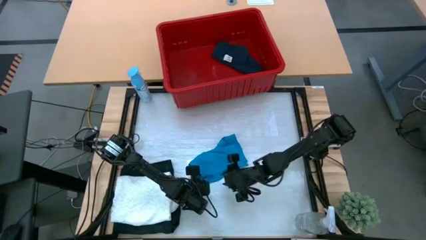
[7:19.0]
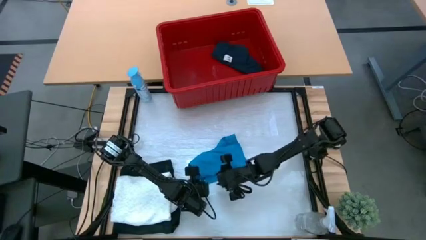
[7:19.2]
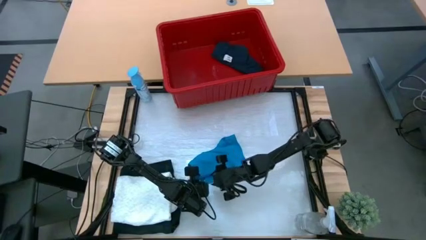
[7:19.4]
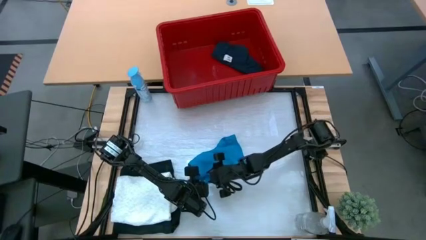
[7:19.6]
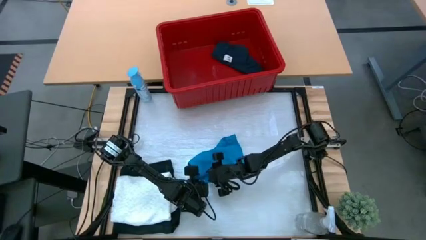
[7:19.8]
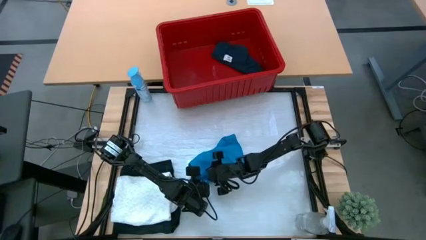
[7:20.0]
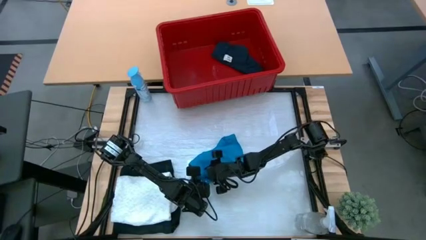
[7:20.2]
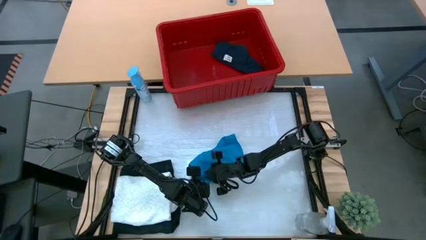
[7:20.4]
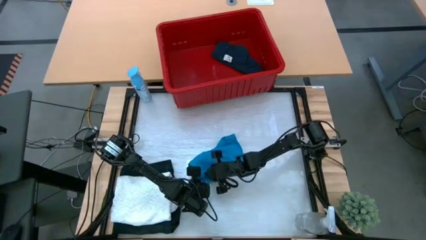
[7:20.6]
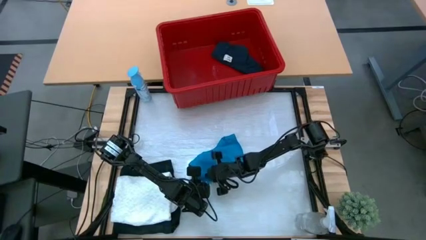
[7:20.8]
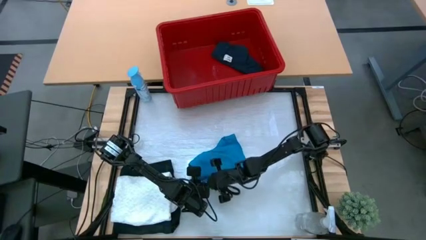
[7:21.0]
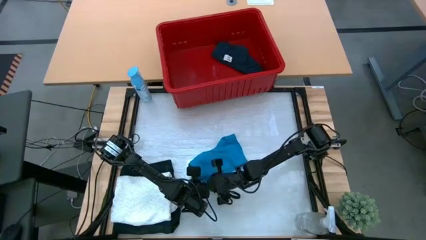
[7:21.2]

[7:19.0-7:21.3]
Task: Fold Laundry from Bin
Fold the blue shorts from the red bin

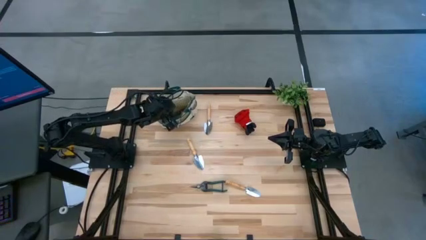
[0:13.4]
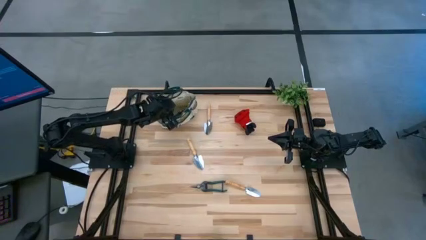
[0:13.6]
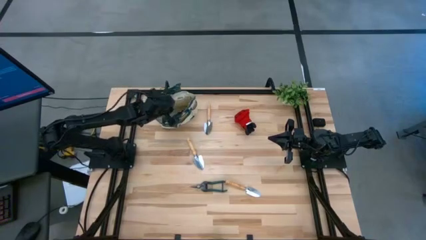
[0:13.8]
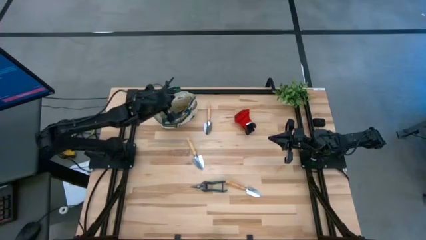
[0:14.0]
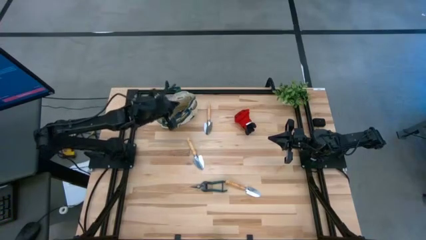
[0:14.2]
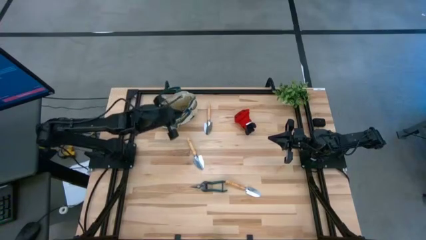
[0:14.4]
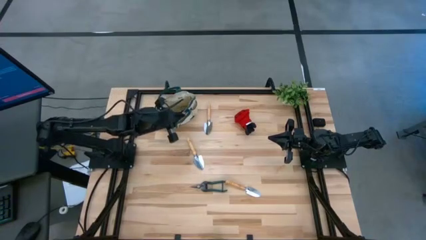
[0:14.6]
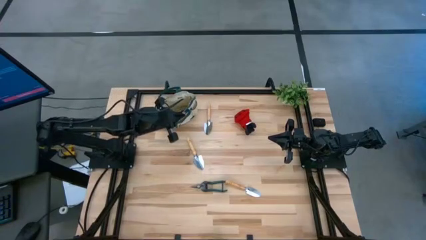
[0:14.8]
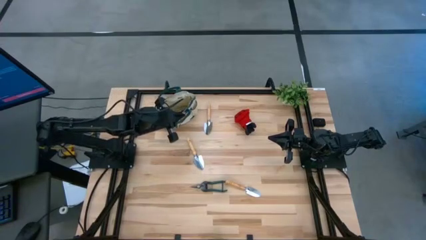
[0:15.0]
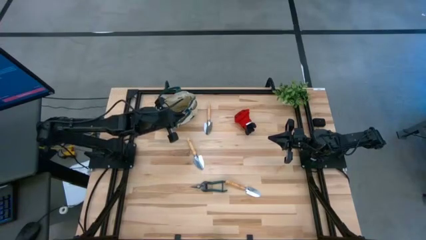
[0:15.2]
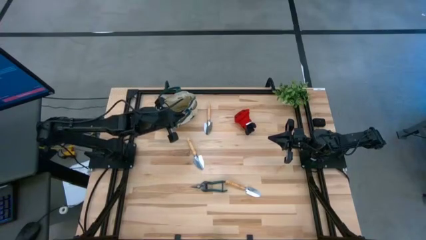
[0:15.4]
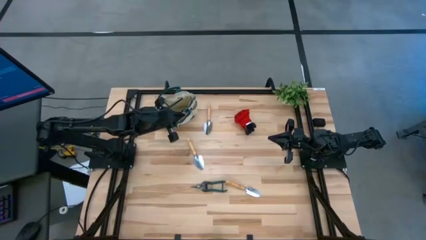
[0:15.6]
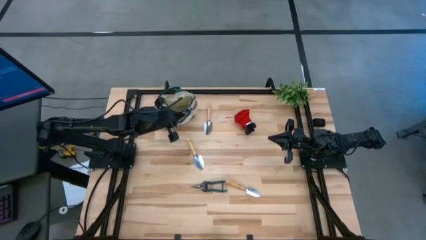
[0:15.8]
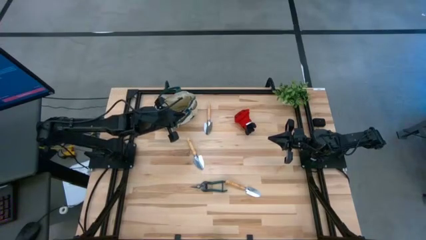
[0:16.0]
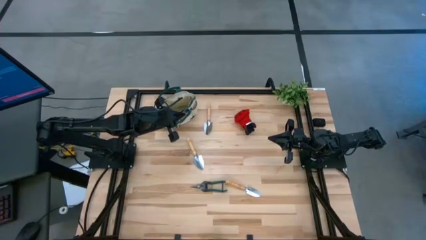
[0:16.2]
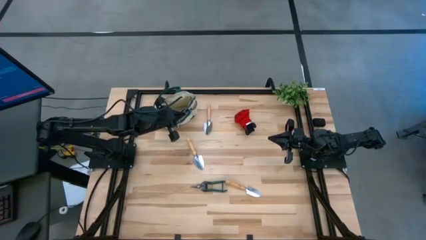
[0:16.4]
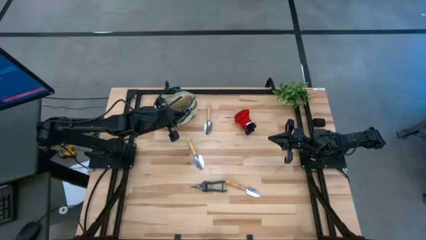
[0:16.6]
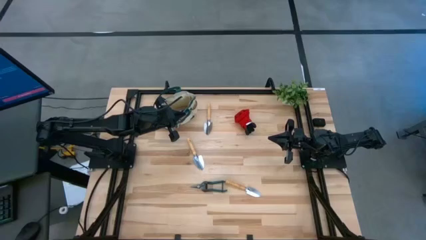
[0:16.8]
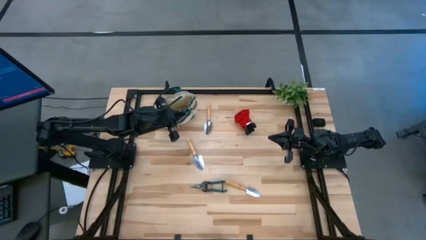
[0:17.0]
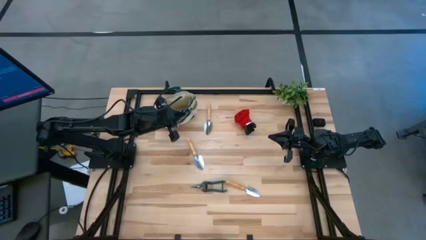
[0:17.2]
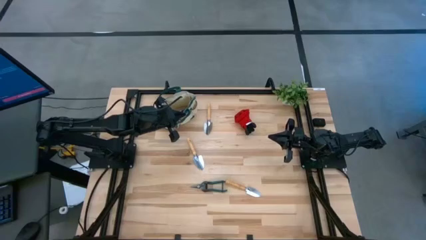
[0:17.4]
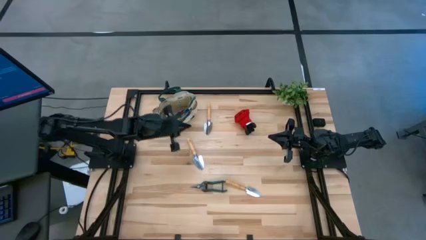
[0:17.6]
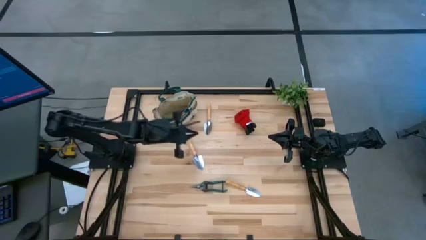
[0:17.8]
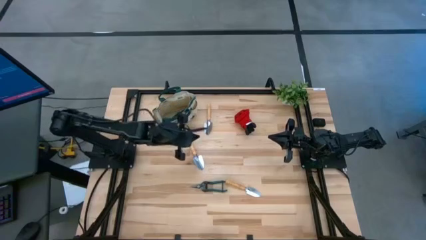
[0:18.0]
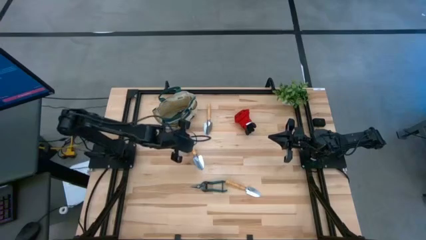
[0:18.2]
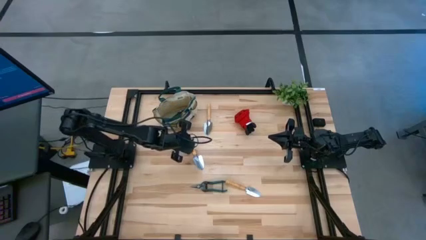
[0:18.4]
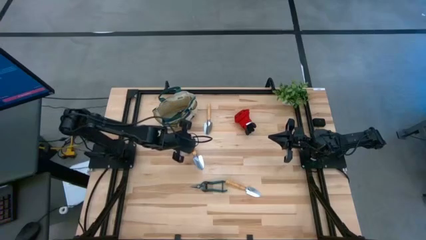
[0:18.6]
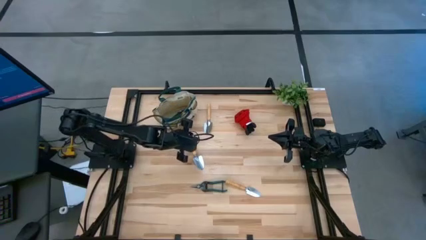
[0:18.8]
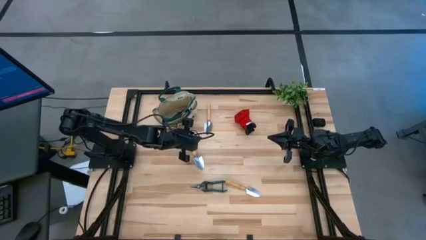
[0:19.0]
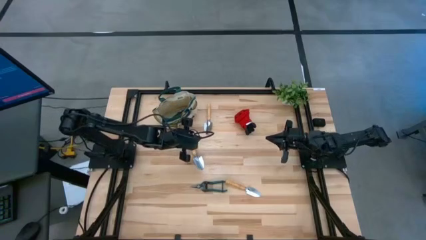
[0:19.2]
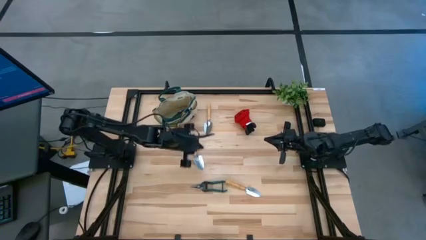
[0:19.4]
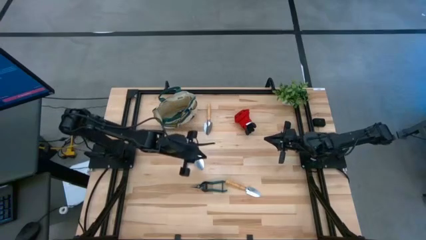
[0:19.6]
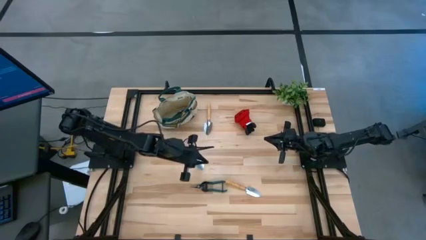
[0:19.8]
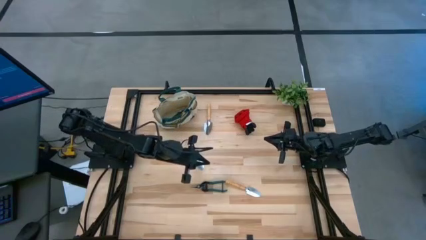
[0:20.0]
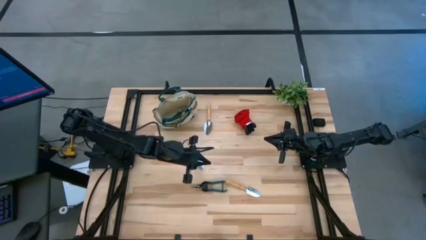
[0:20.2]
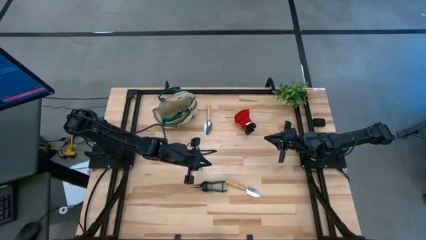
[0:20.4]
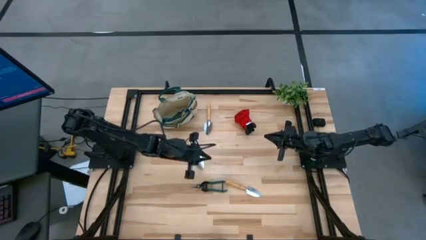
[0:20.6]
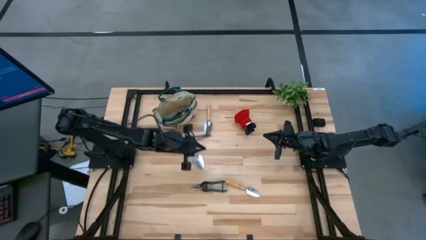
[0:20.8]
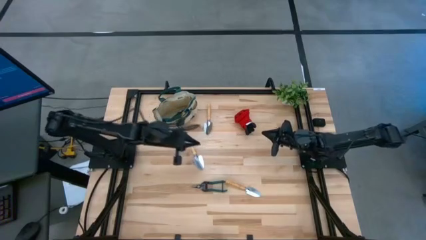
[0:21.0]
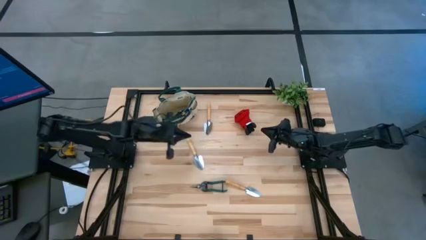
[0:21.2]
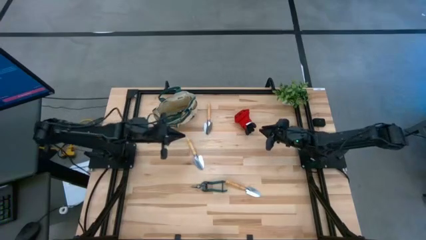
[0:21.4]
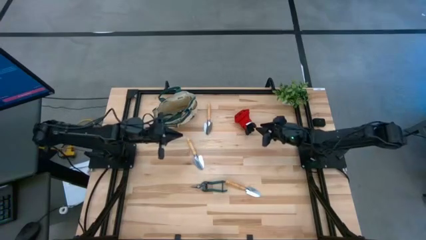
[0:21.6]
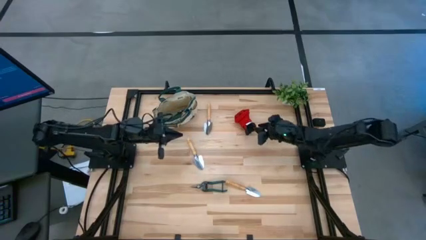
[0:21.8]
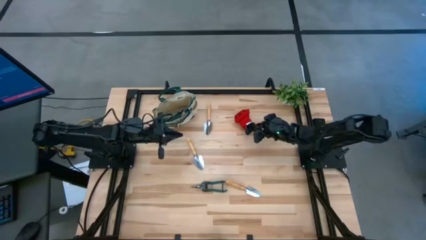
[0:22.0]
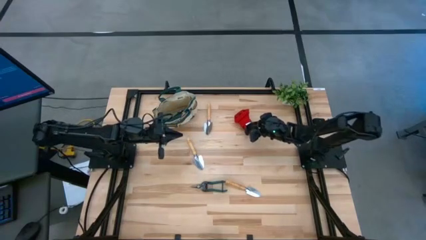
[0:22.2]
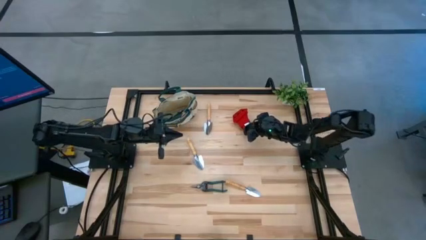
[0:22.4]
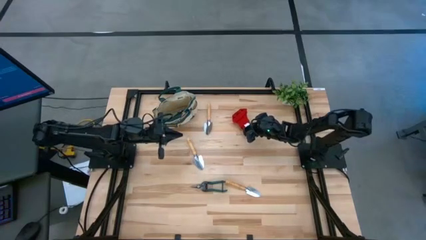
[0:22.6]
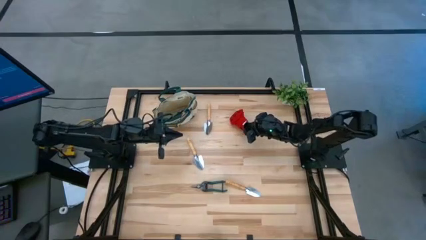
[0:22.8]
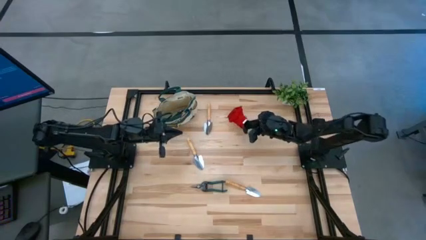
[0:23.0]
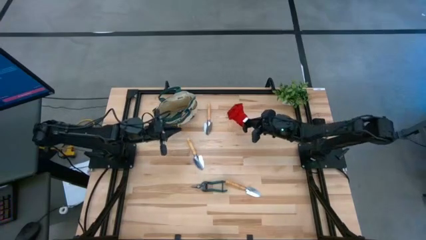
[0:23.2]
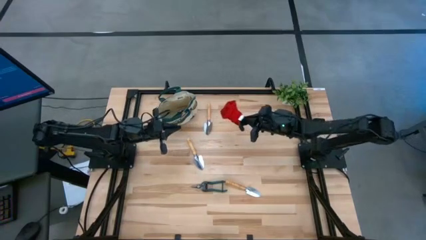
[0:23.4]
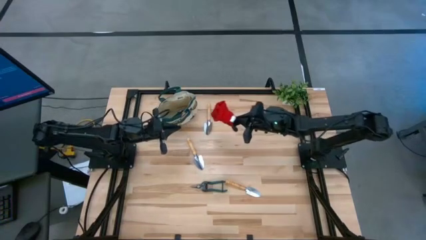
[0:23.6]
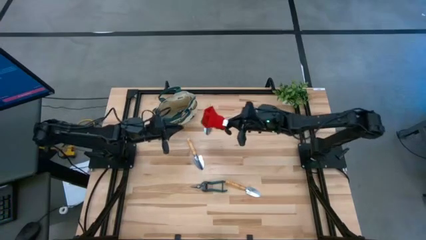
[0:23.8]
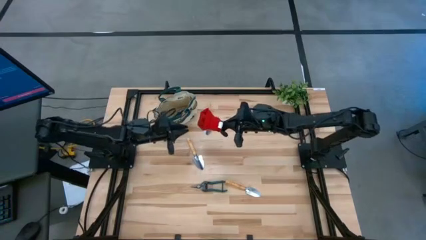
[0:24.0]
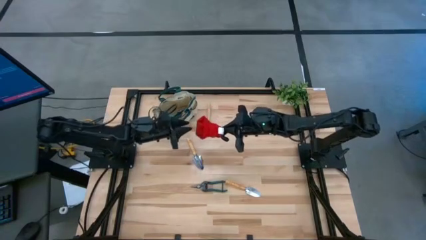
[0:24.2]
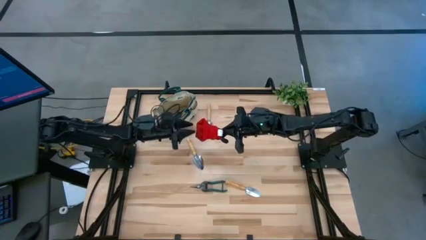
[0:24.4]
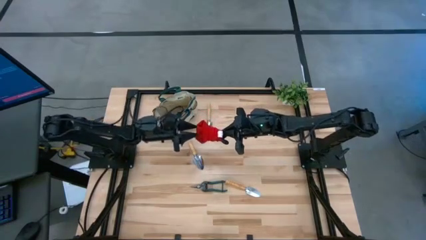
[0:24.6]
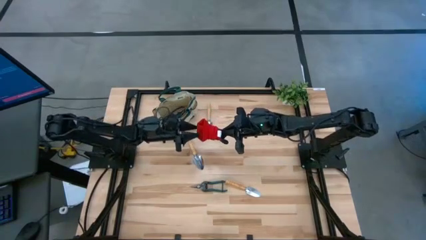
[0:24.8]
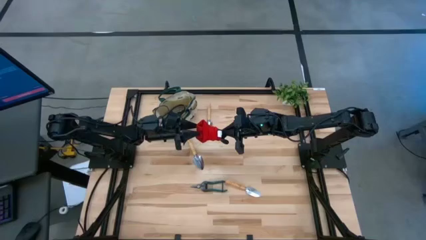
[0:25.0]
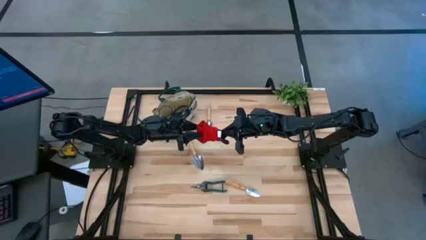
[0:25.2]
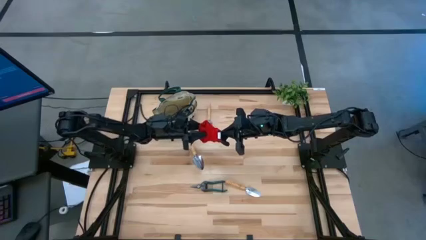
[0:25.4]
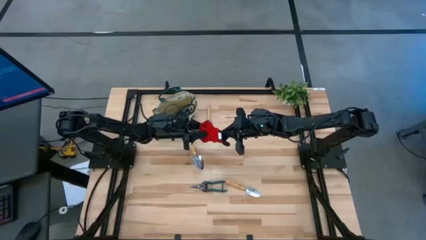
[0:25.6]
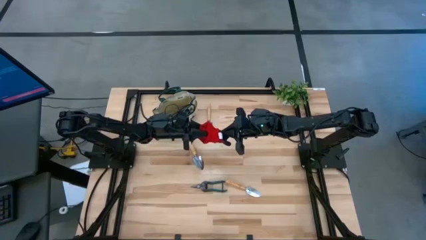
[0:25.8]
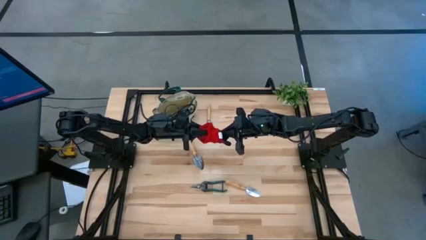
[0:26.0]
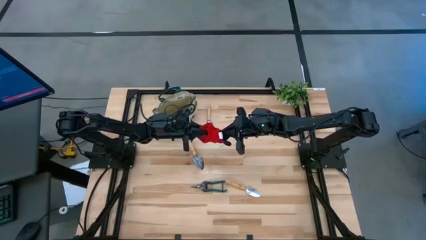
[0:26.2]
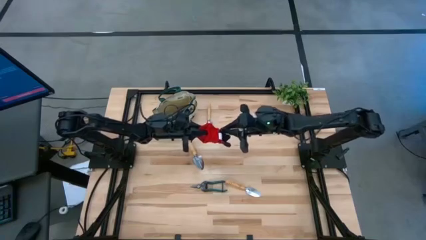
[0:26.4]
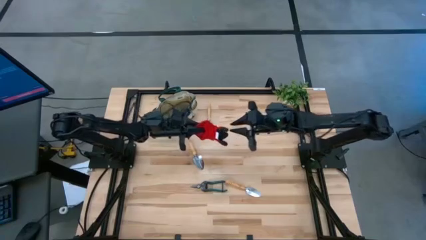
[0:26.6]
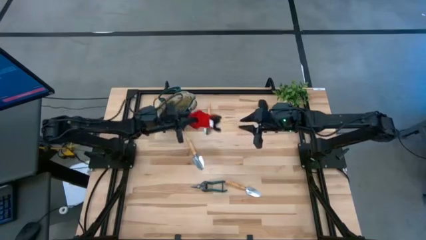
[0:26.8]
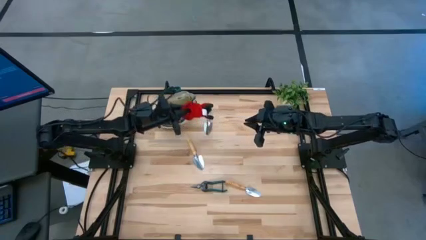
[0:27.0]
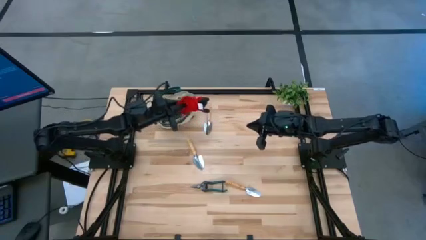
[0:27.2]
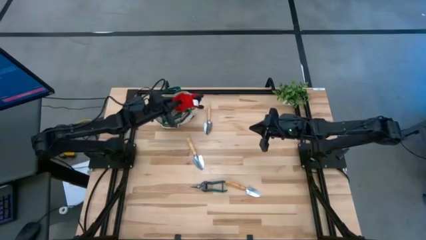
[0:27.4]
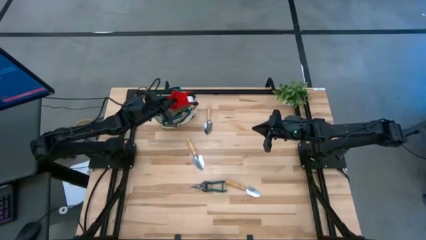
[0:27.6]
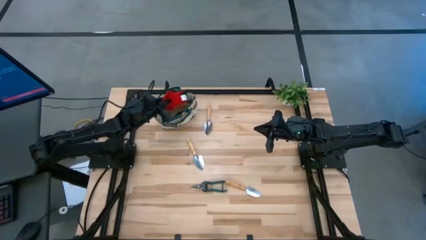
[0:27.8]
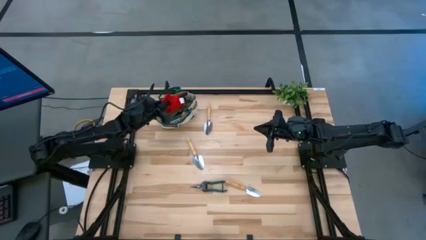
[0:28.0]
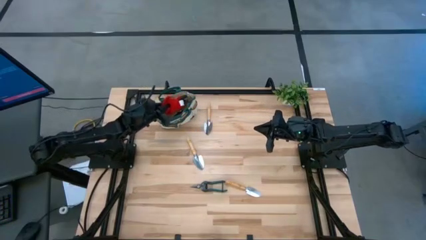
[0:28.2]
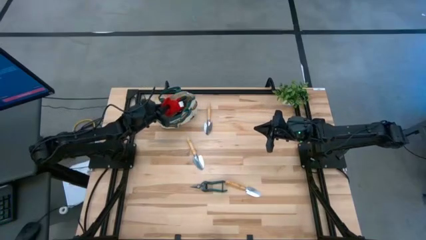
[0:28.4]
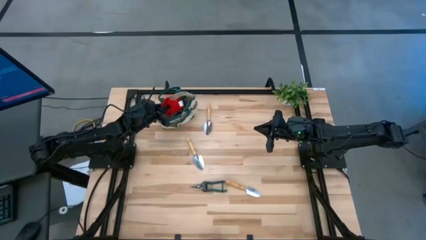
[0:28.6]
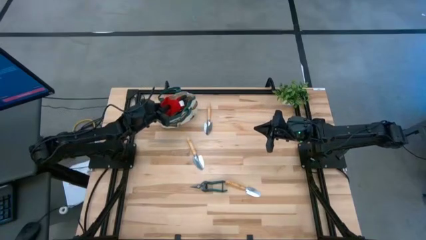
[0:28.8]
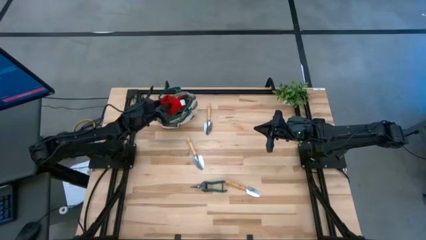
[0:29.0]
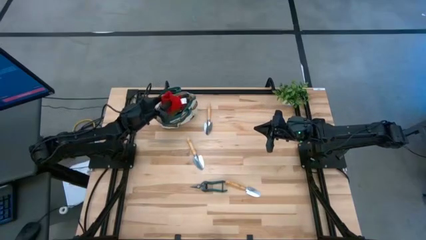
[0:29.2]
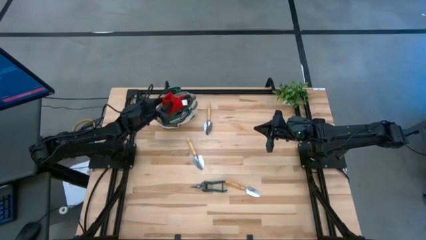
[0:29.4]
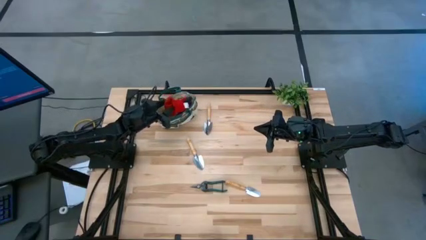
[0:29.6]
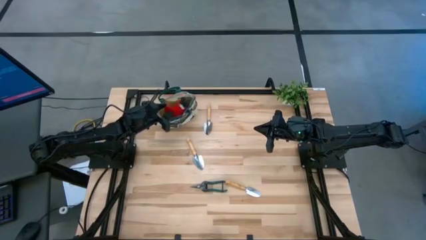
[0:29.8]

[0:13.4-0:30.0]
Task: Pick & Place Garden tools in Gardening bag
Put the red gloves into the yellow gardening bag
